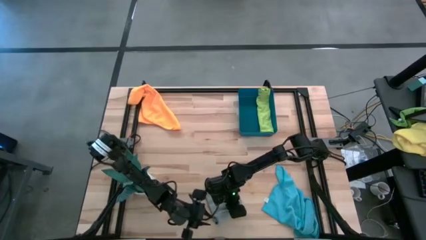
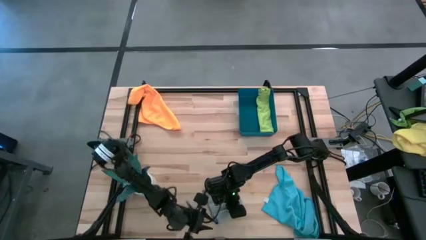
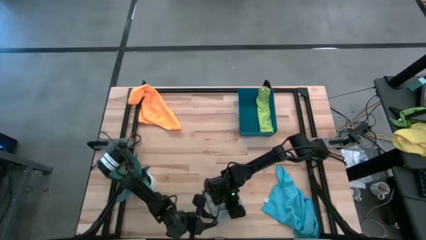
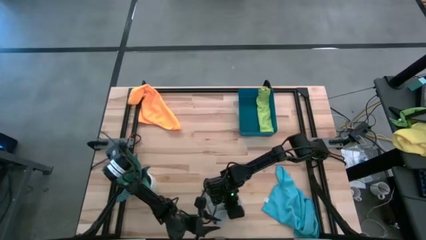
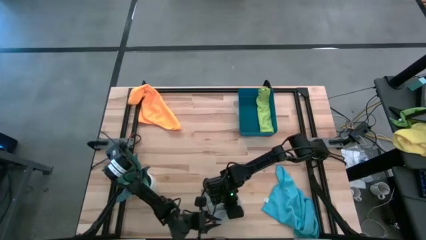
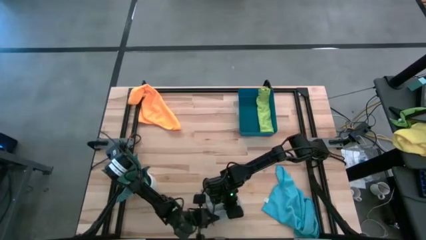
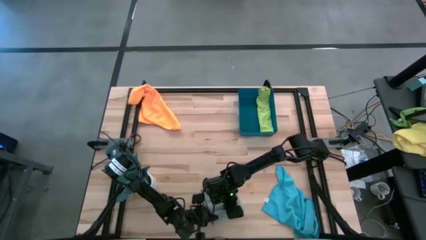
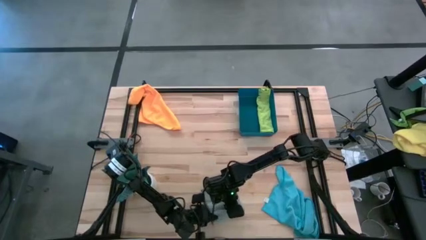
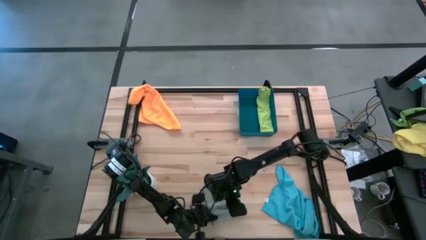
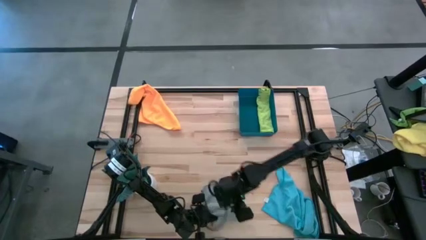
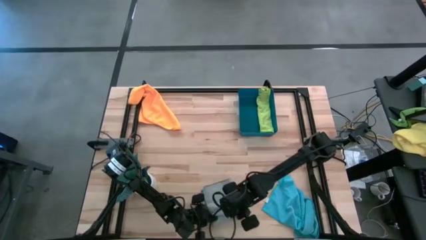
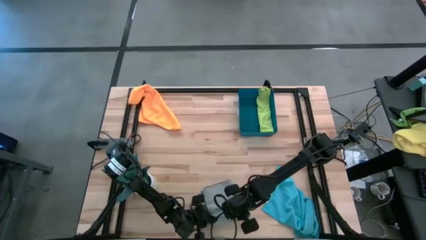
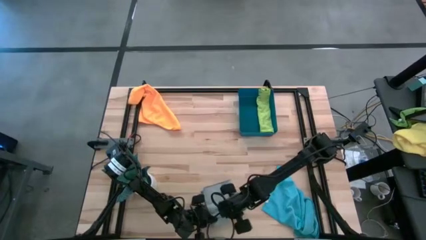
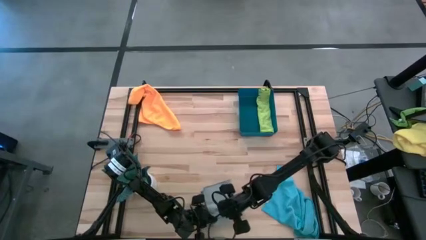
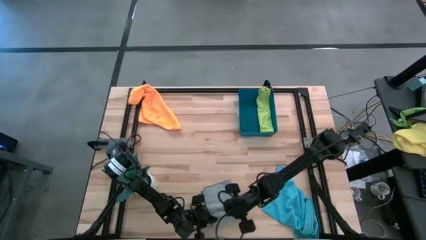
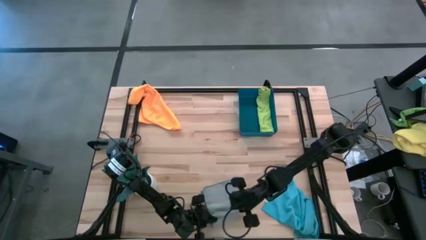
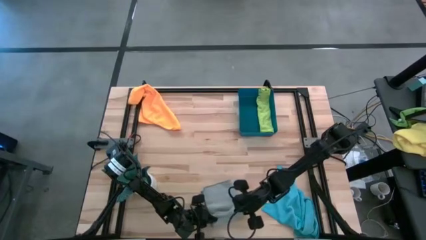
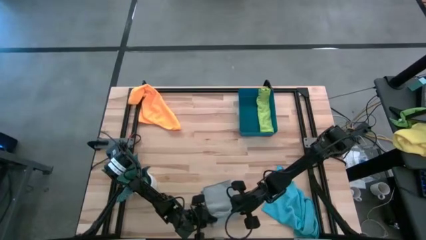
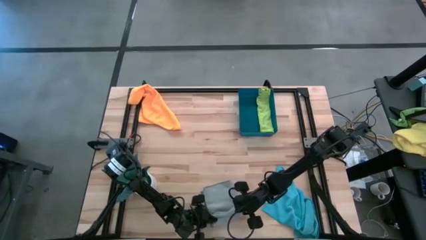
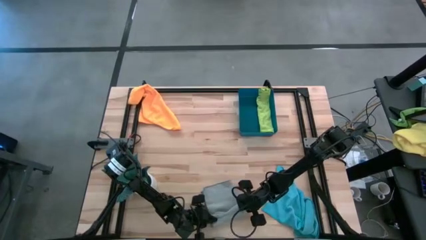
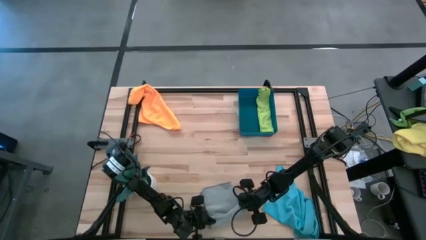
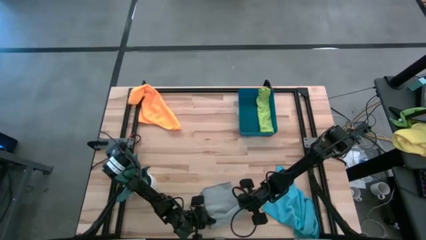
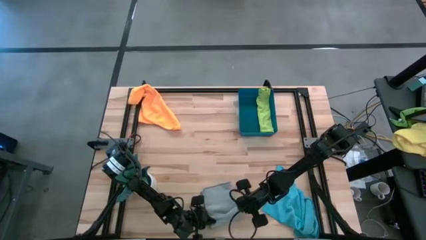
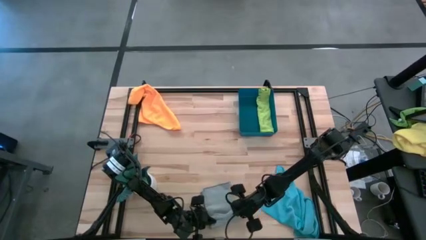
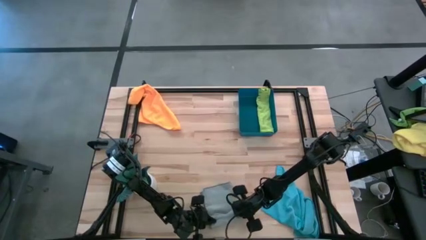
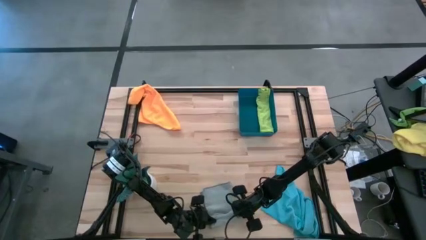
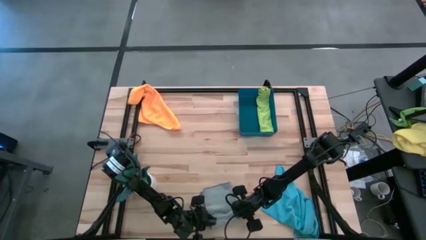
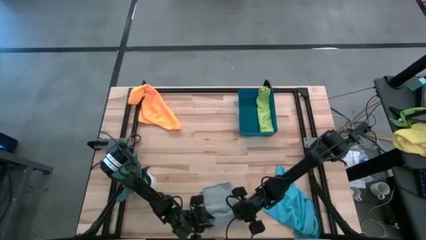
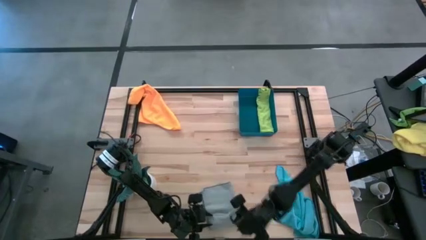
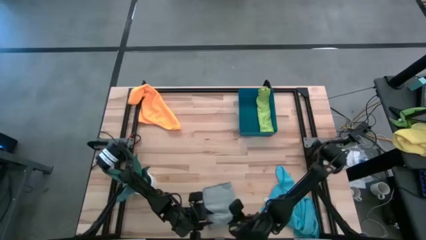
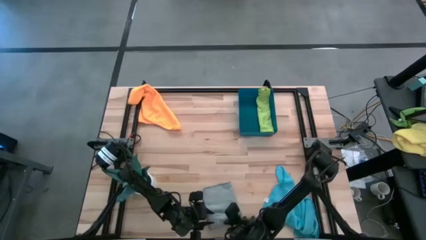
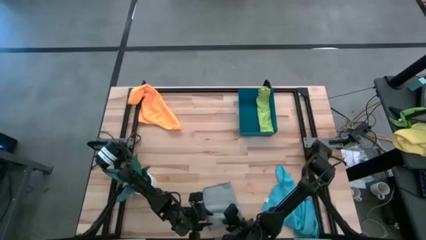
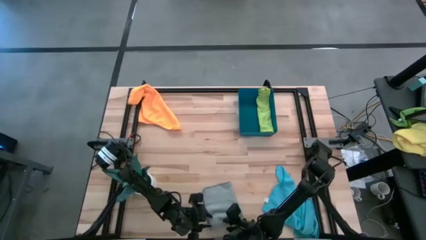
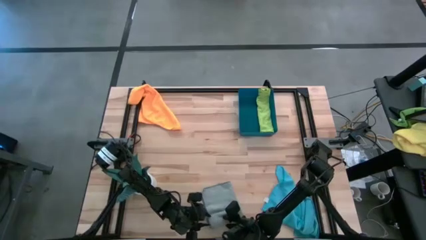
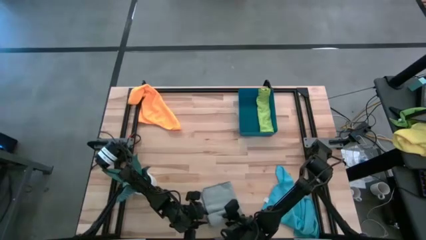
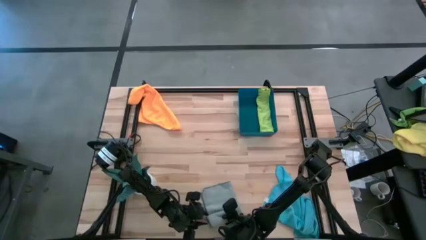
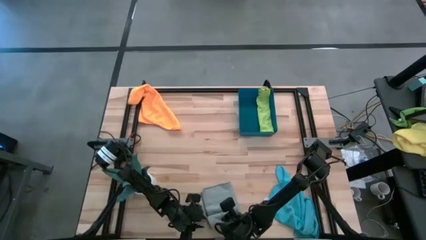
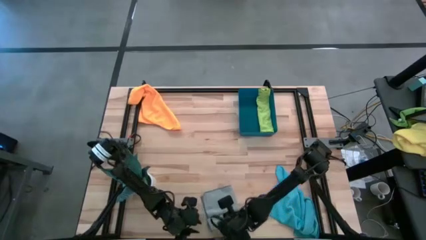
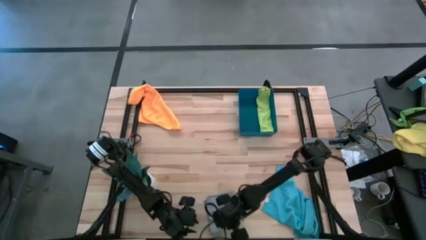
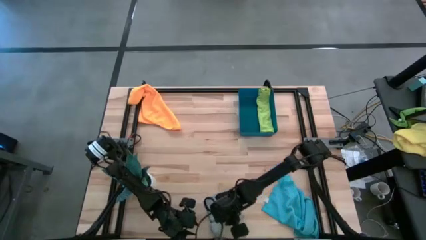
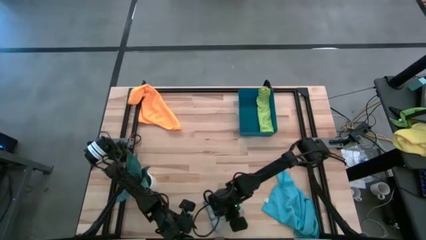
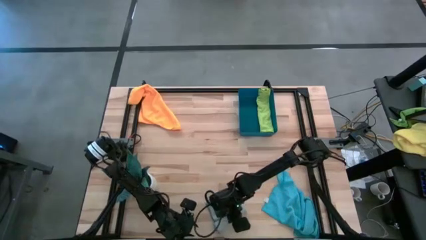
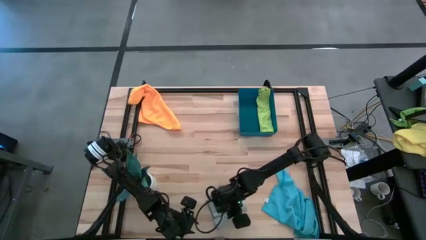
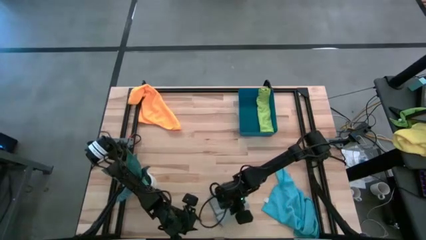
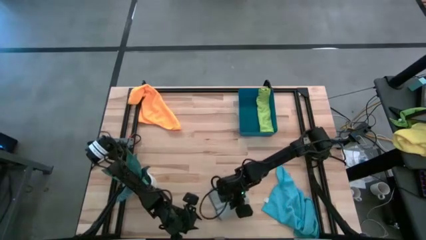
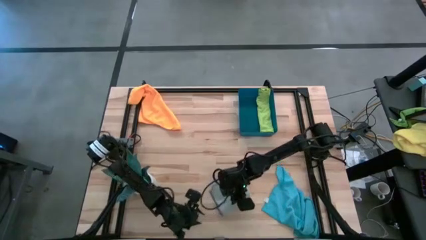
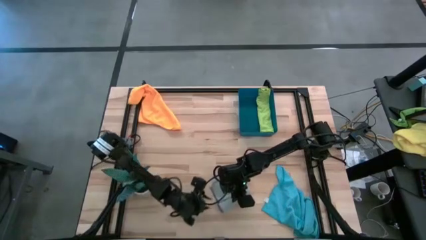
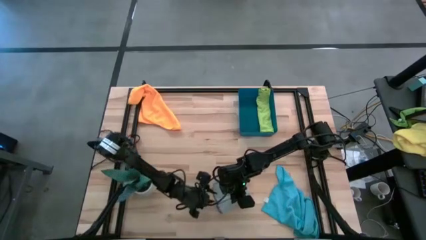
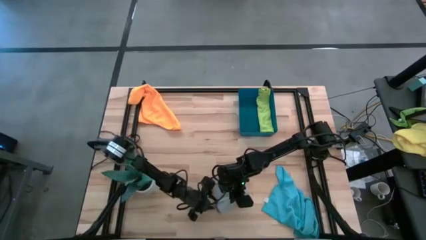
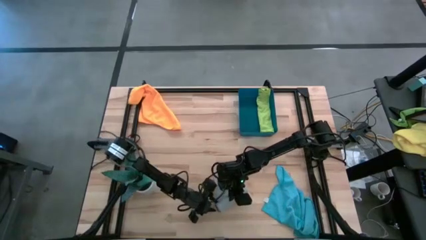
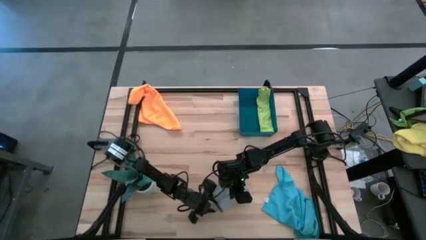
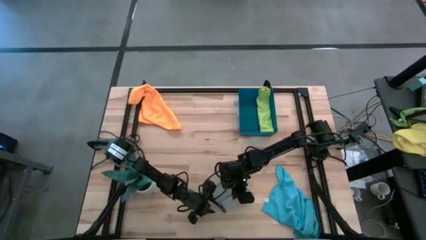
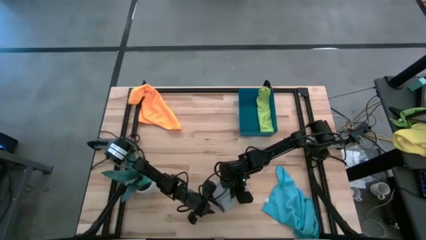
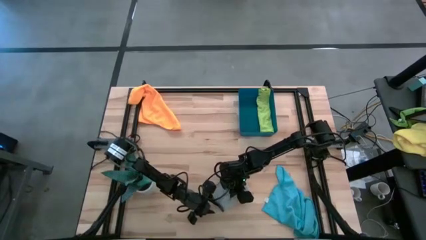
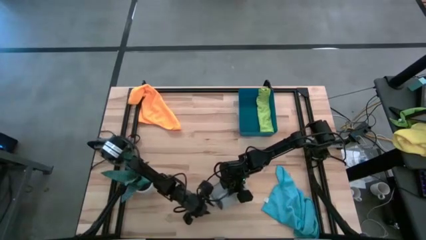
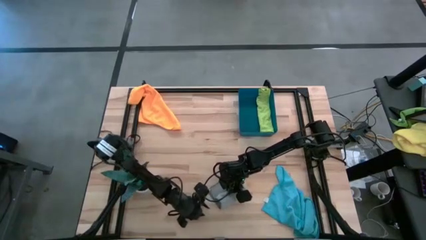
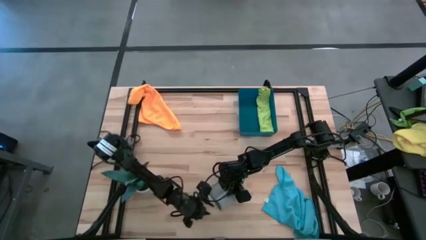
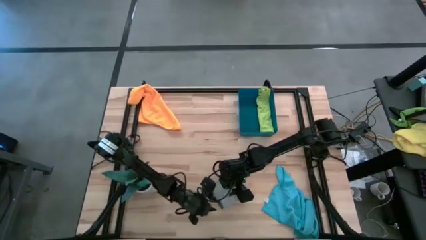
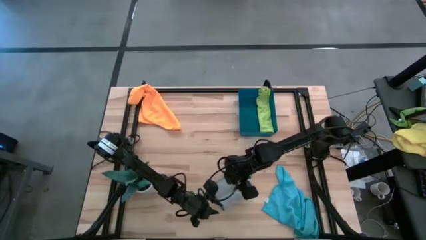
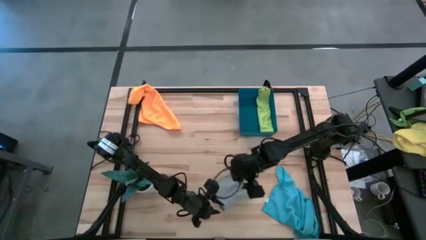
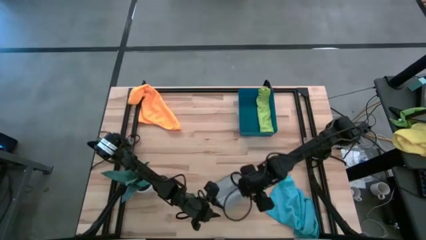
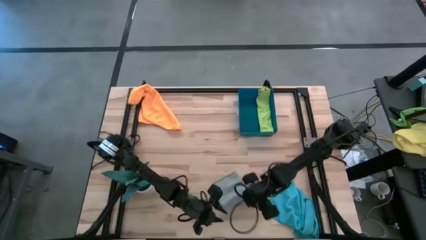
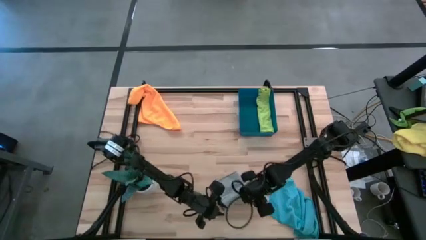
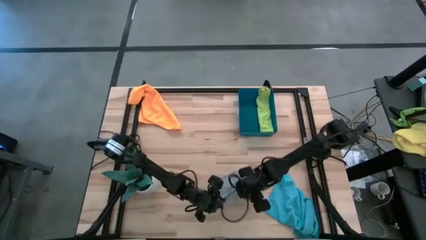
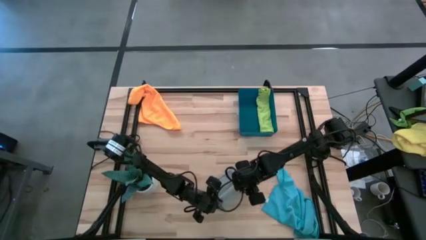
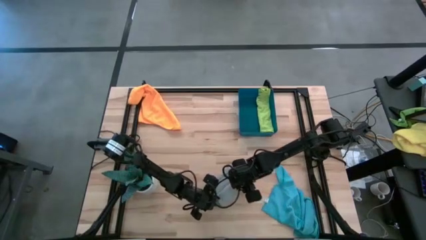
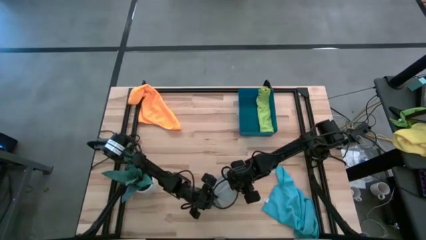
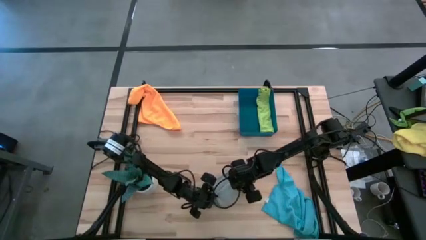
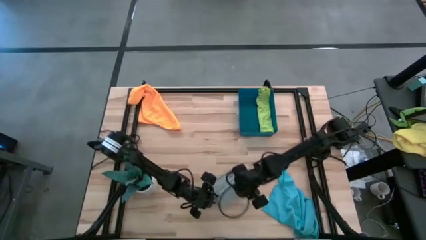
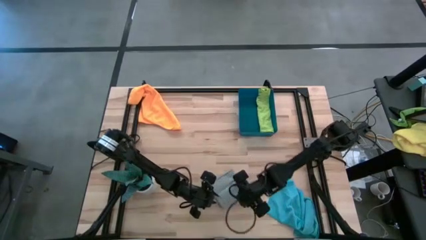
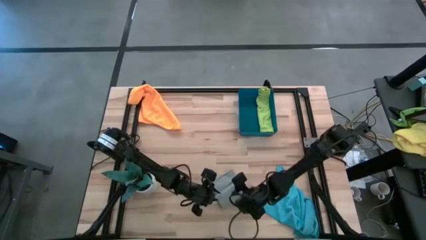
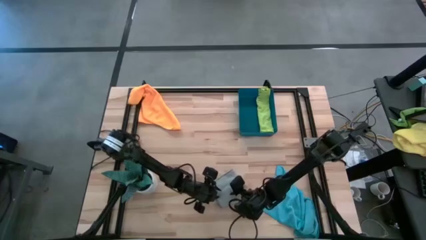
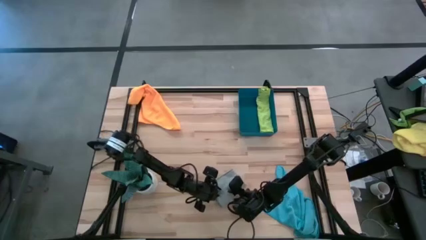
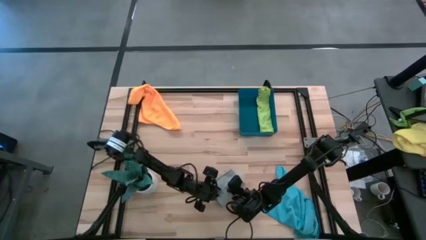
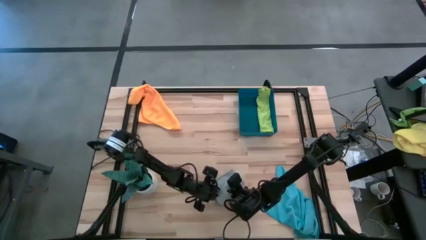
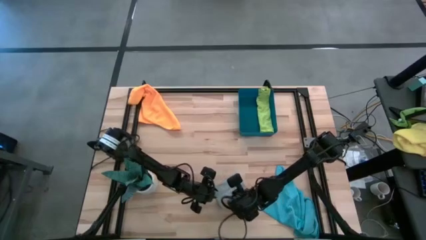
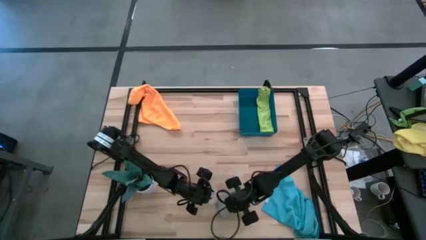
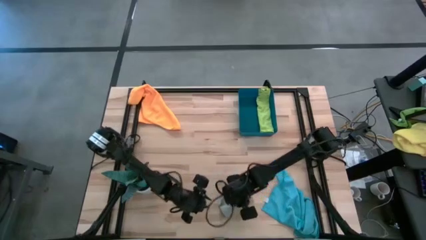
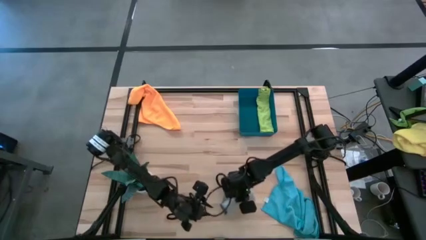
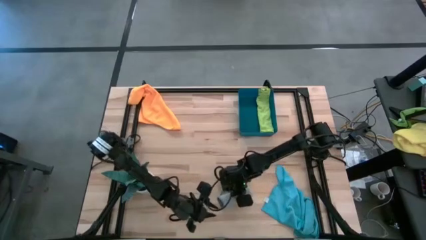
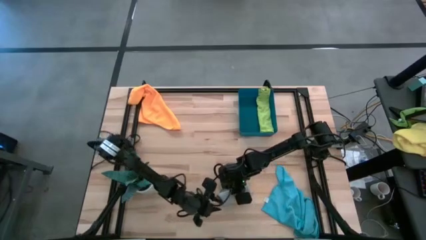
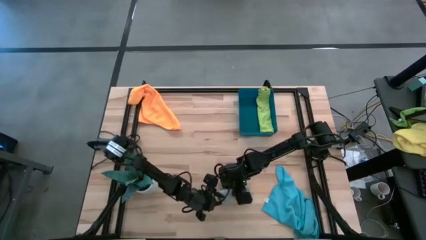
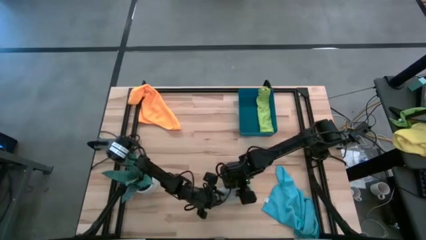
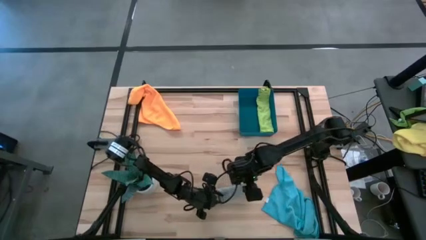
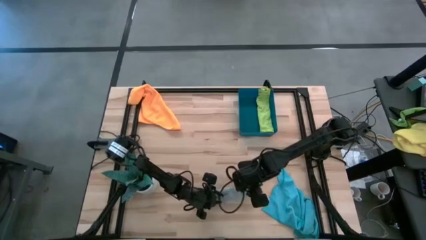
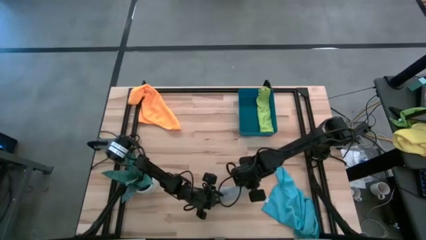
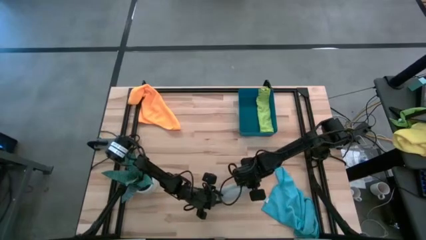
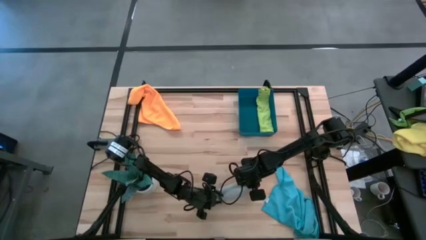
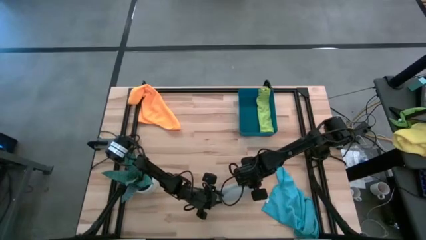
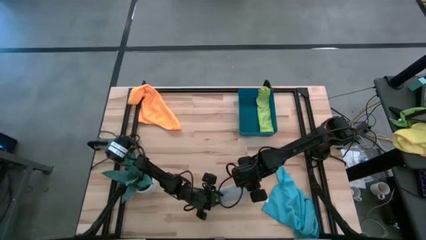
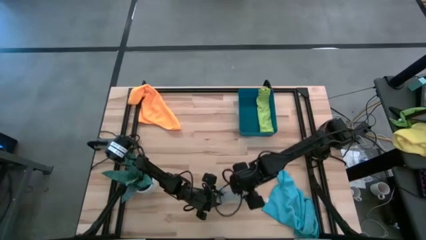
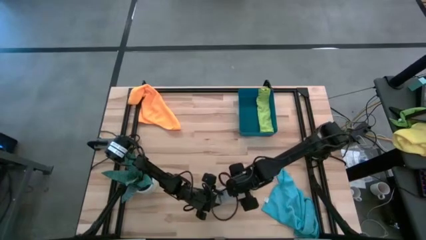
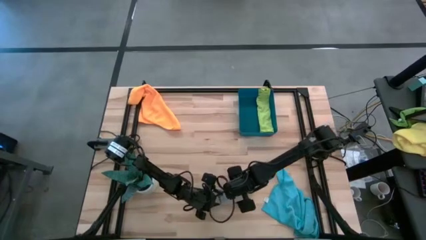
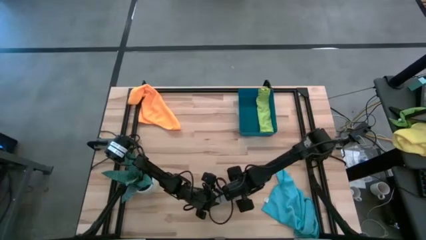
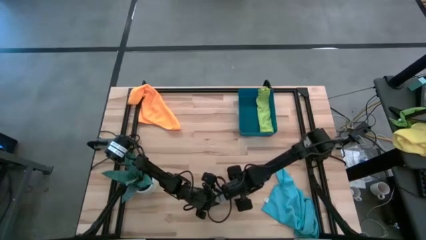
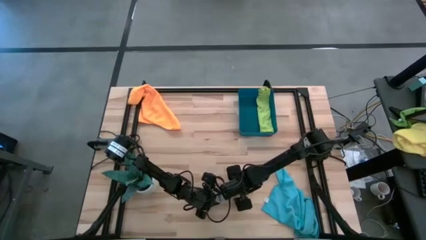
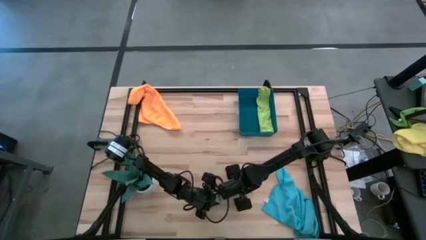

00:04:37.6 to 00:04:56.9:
Task: Roll microfiber towels into tight, uniform cylinder then place into a basket
Roll the gray towel
